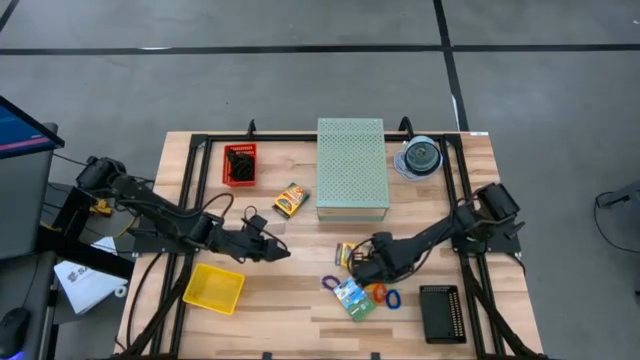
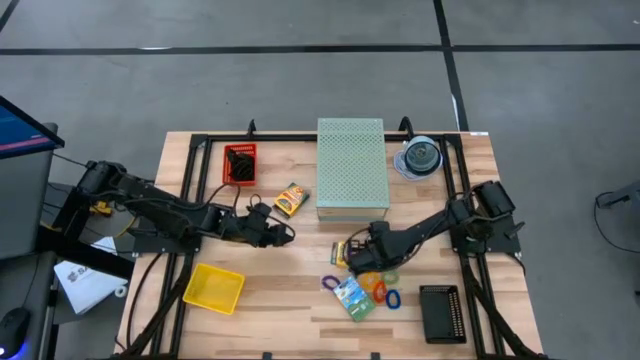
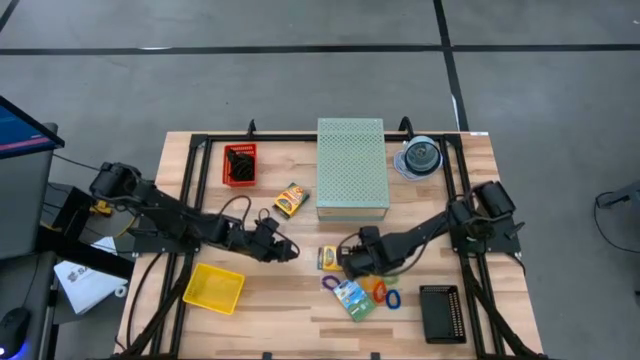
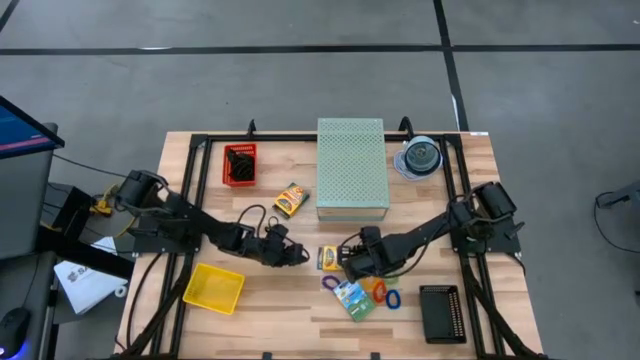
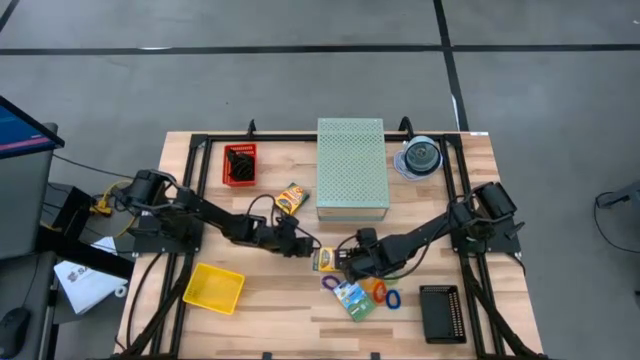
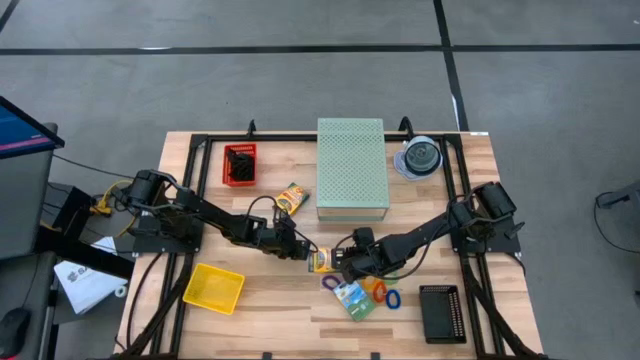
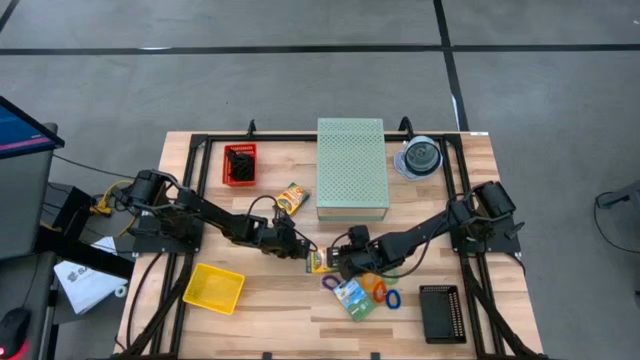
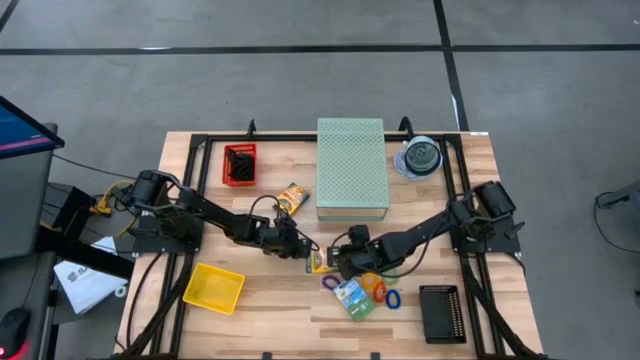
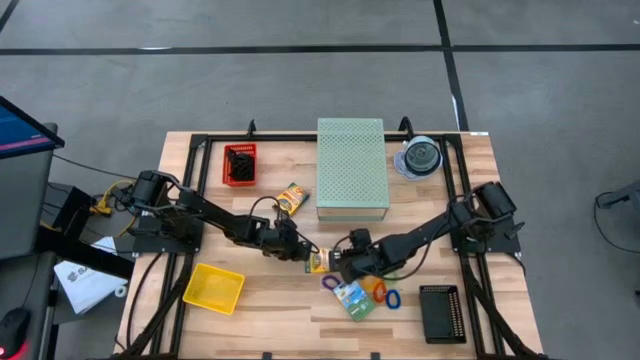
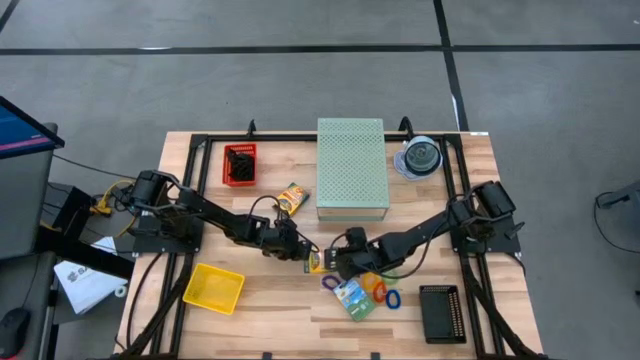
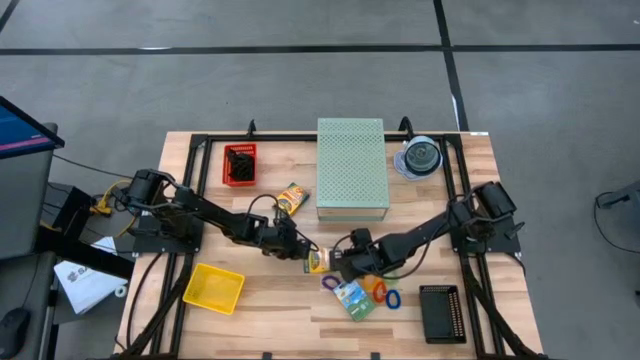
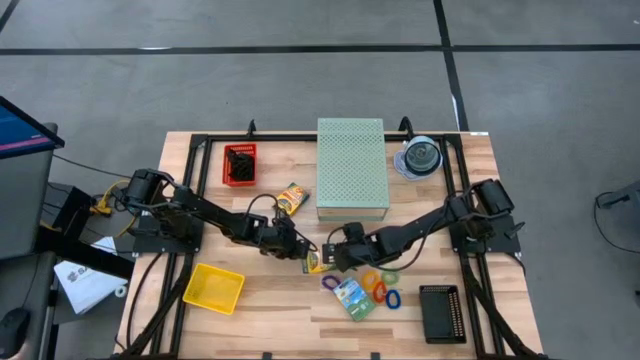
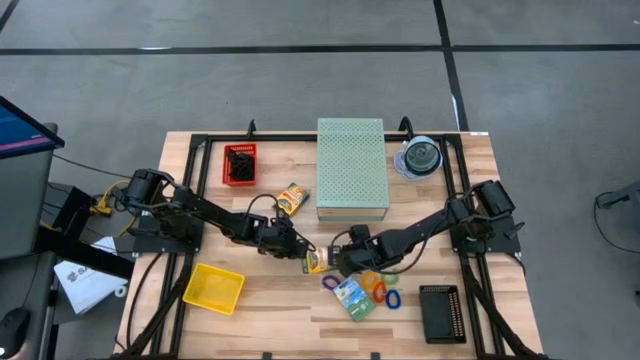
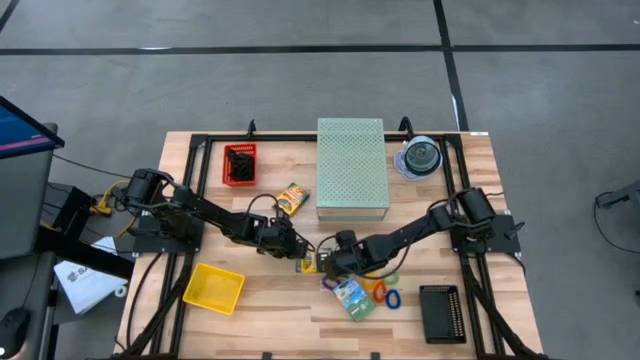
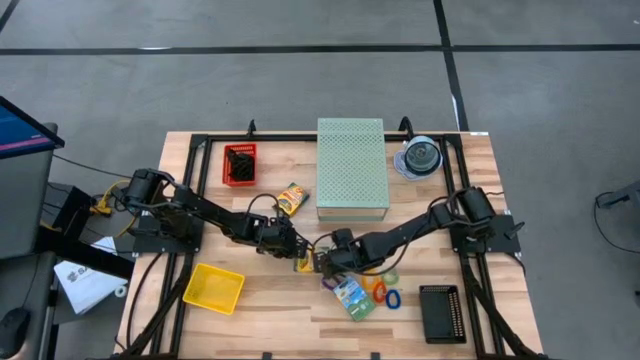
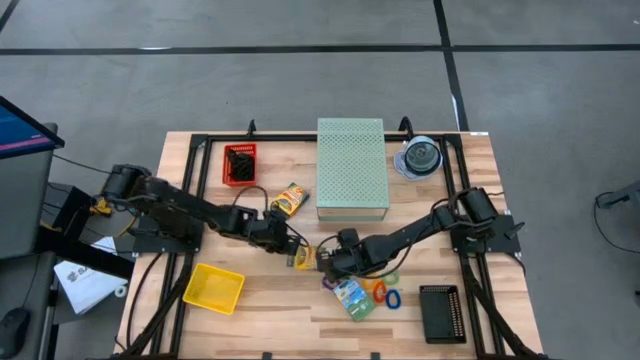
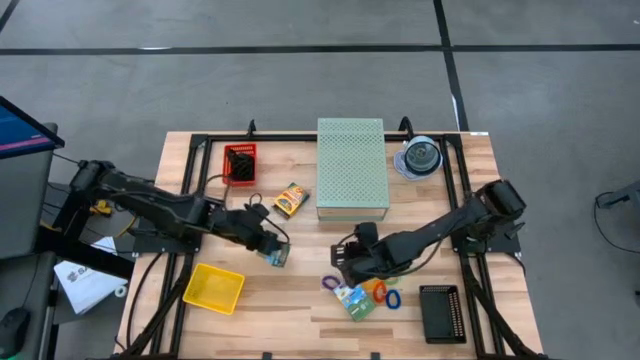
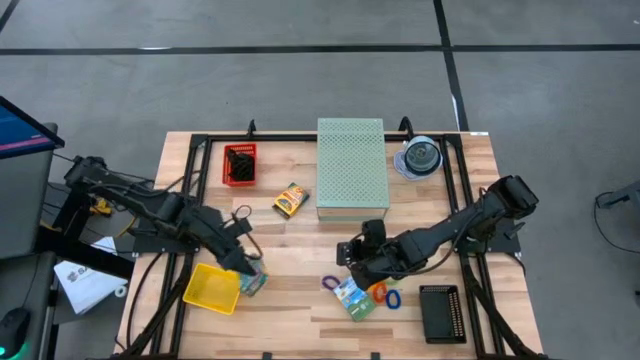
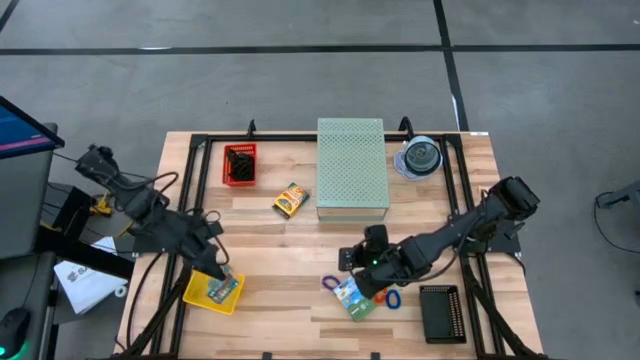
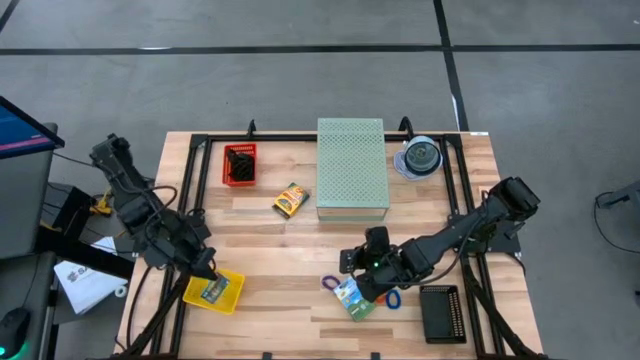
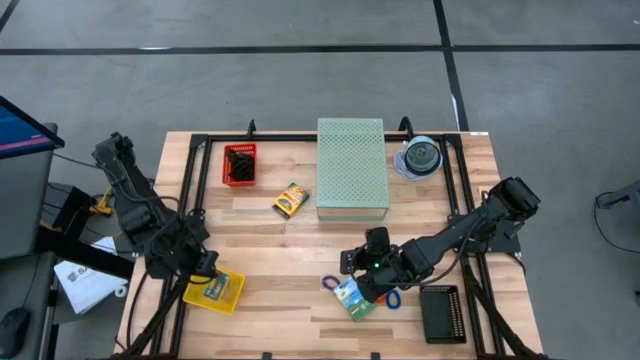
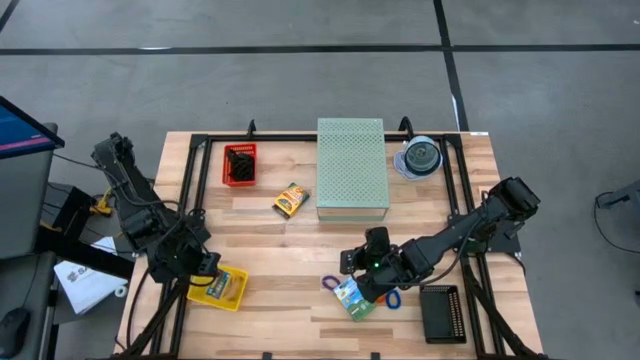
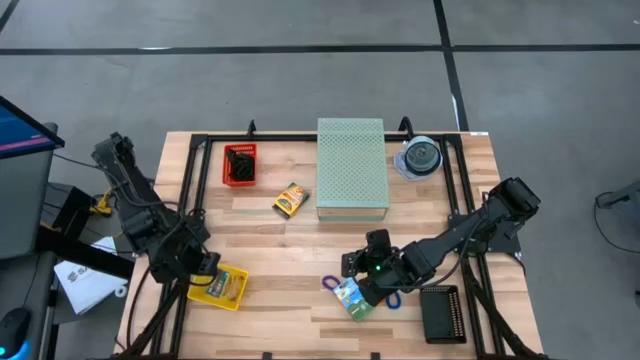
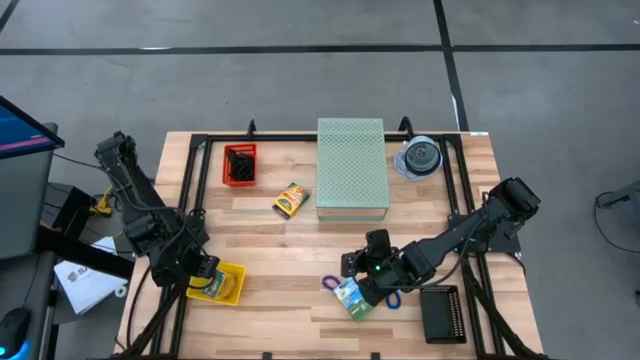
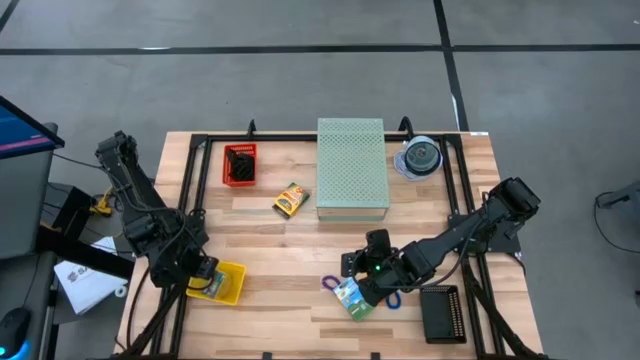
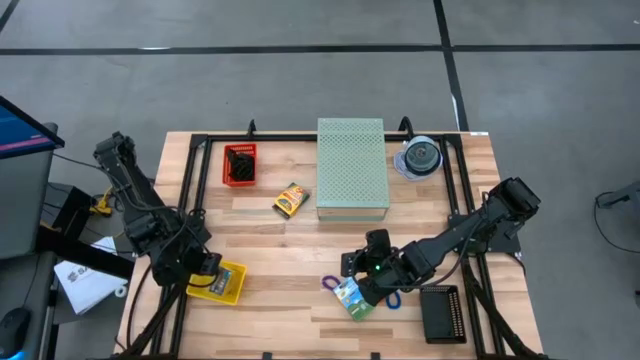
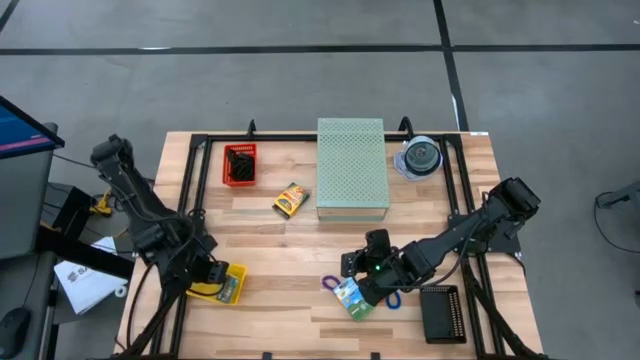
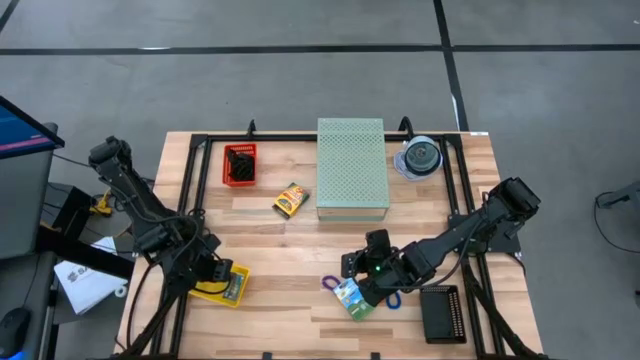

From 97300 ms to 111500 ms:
Task: Pick & Place Office Desk Supplies
Put the crayon box into the yellow bin
